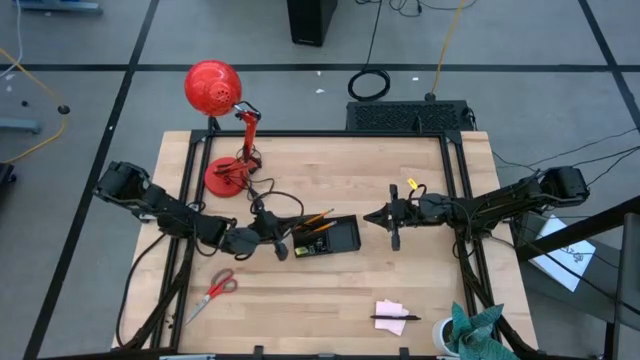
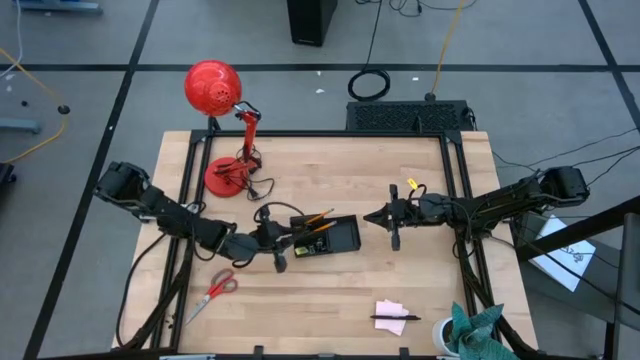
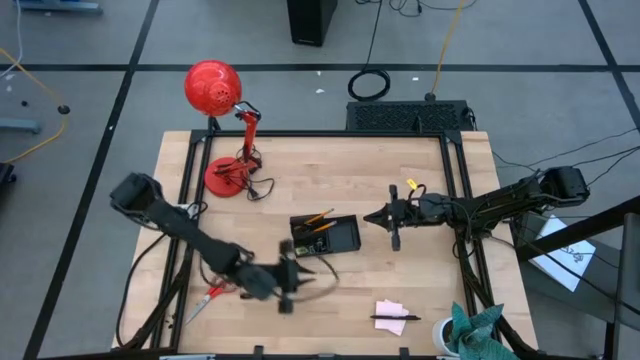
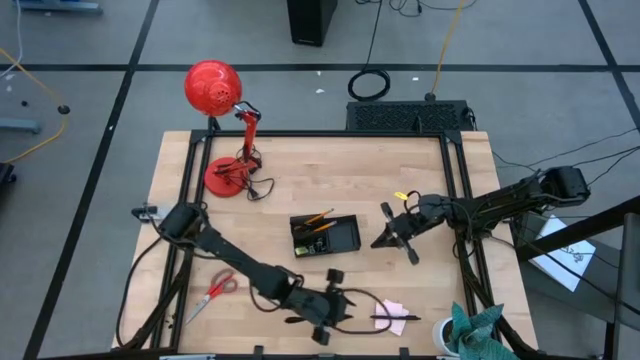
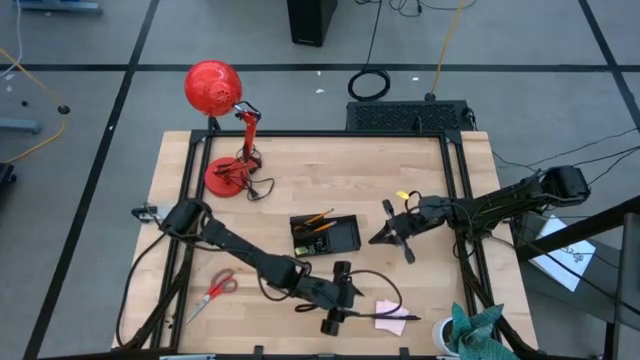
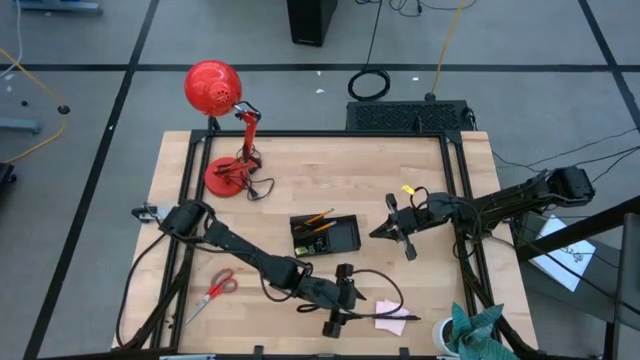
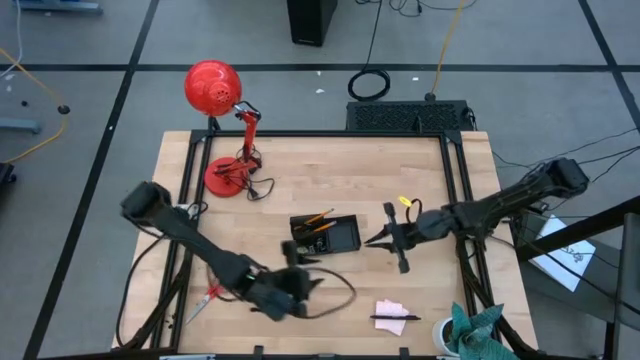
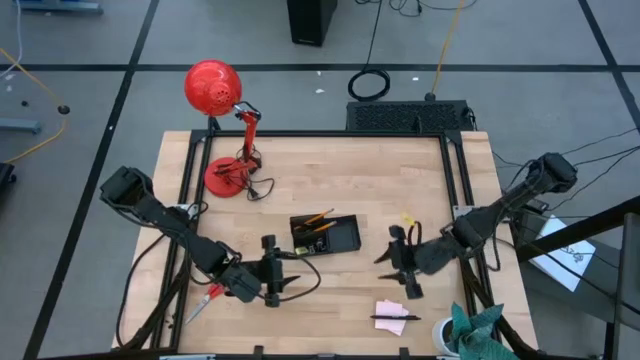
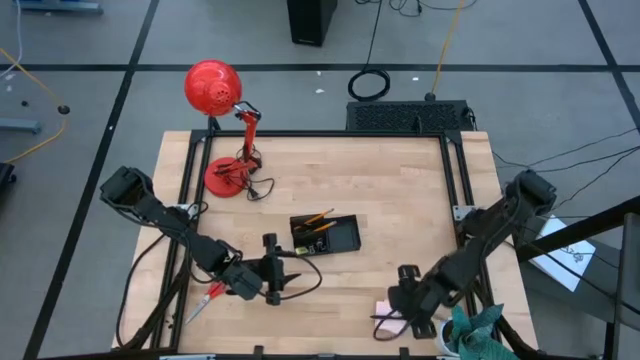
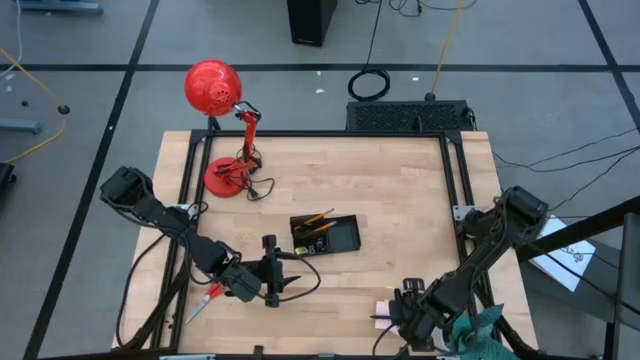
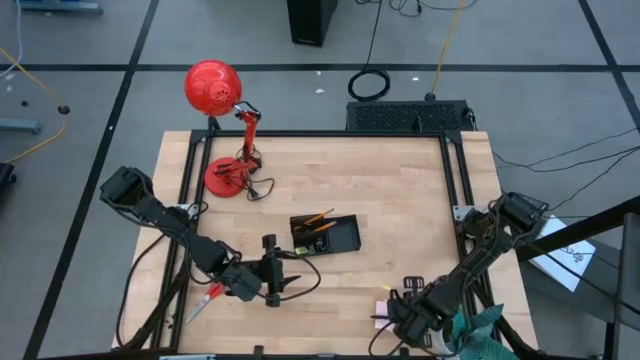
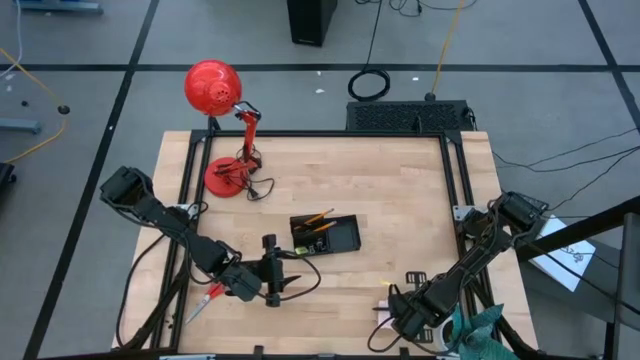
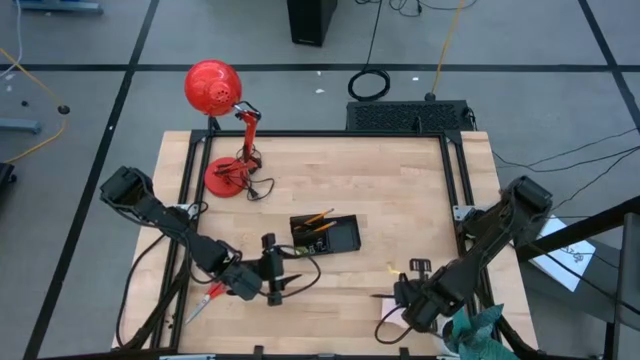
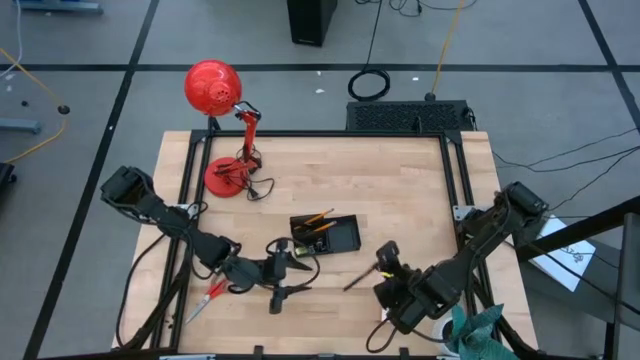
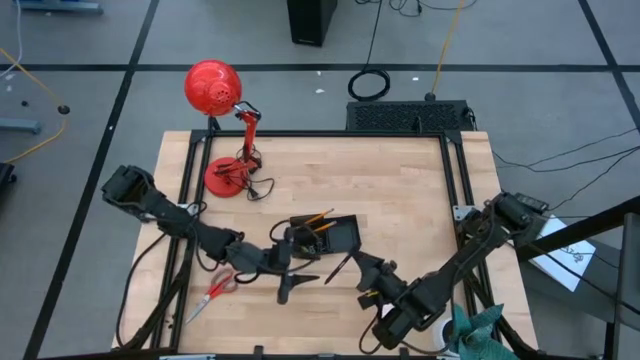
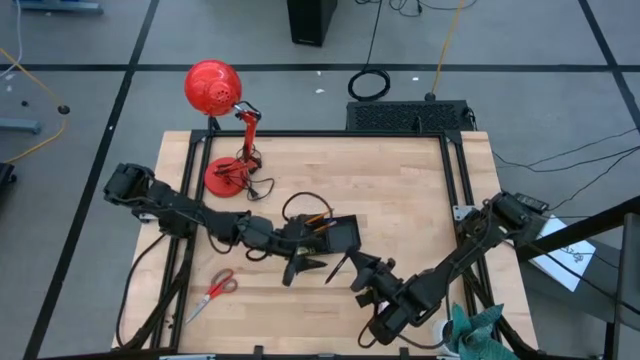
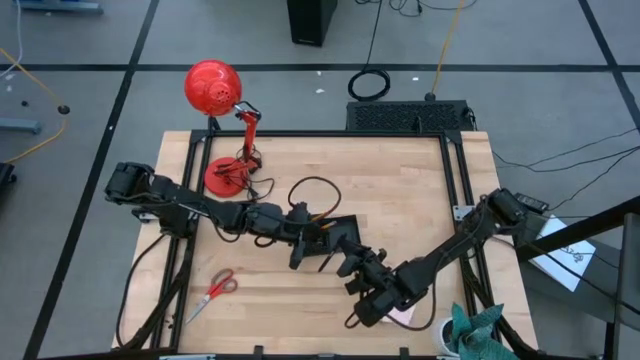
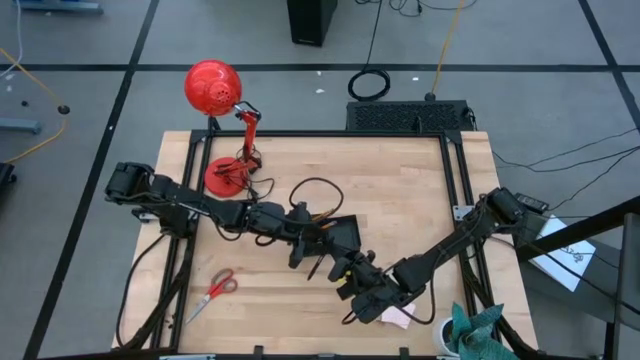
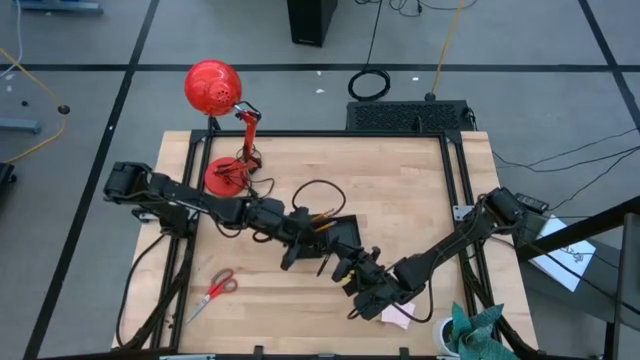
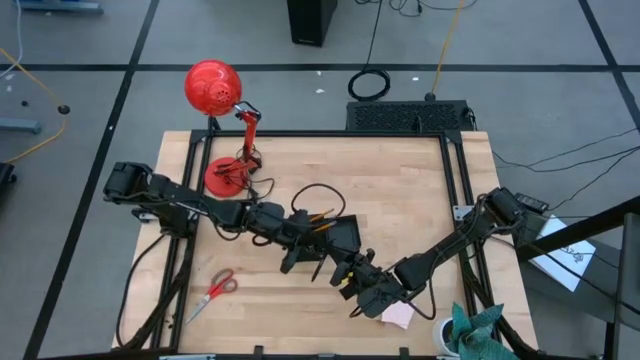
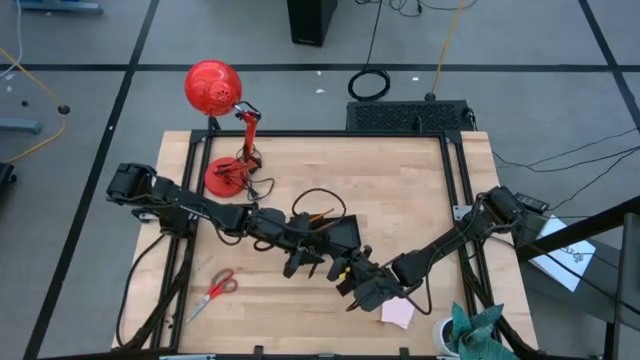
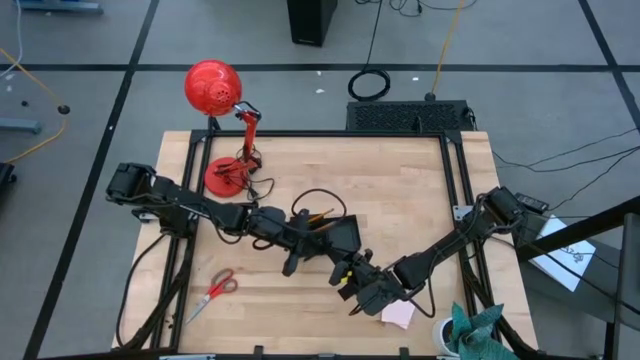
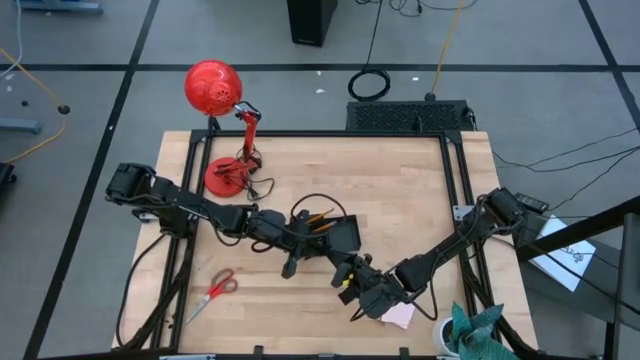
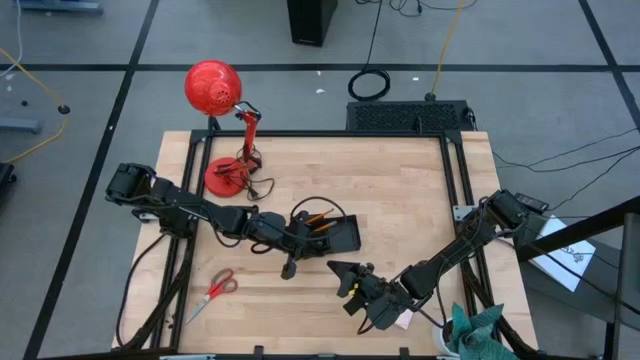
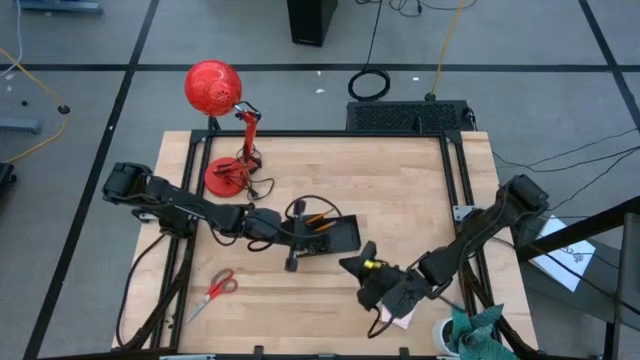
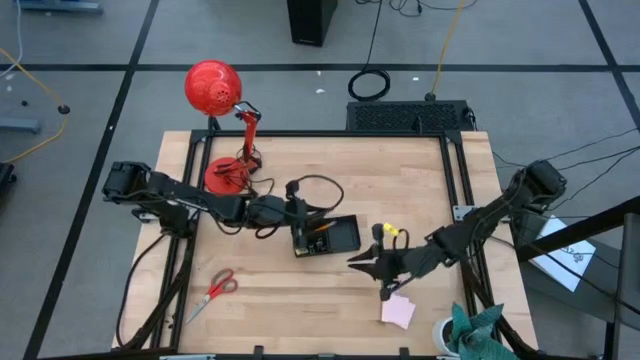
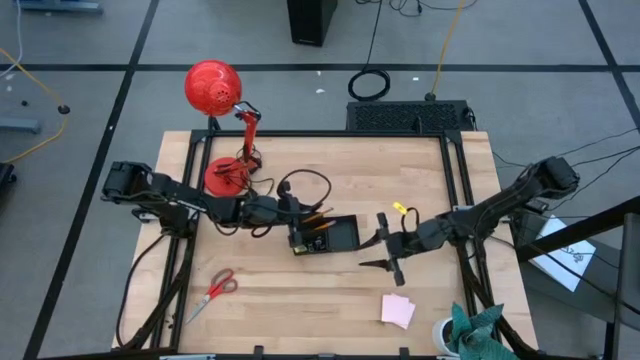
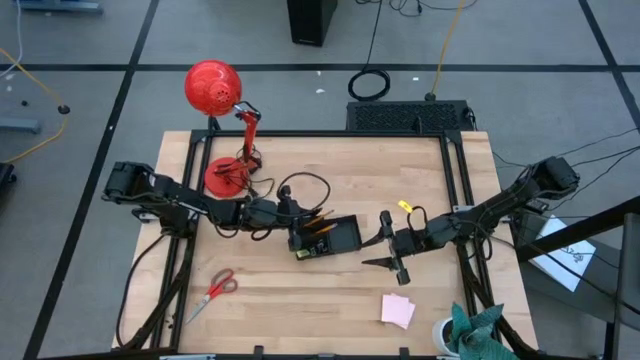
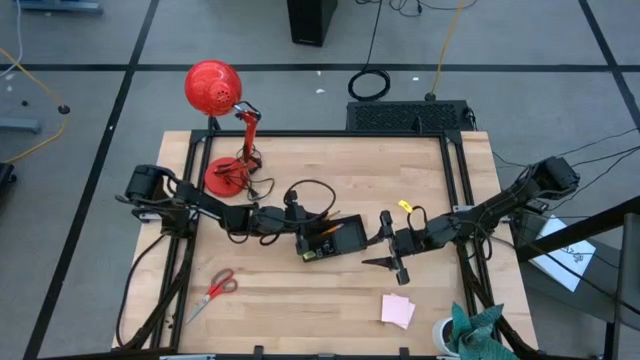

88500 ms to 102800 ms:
Task: Pick and place office supplies into organizer
Put the pen into the desk organizer

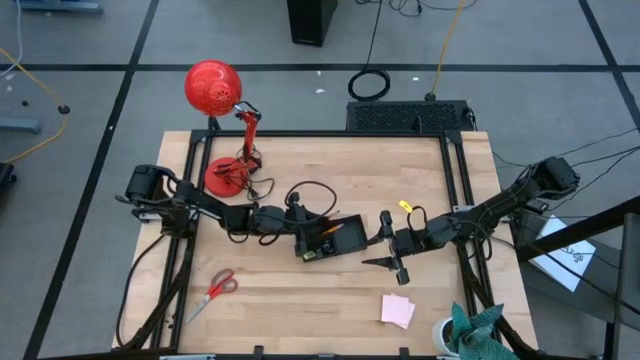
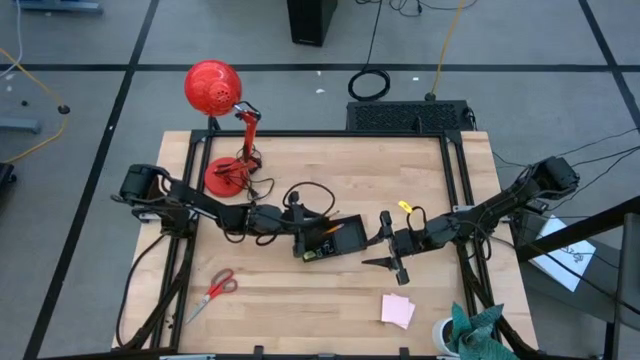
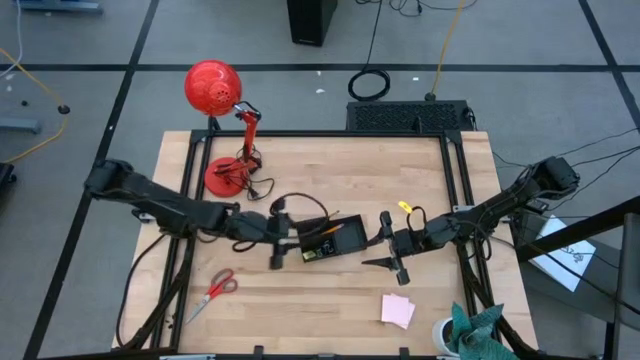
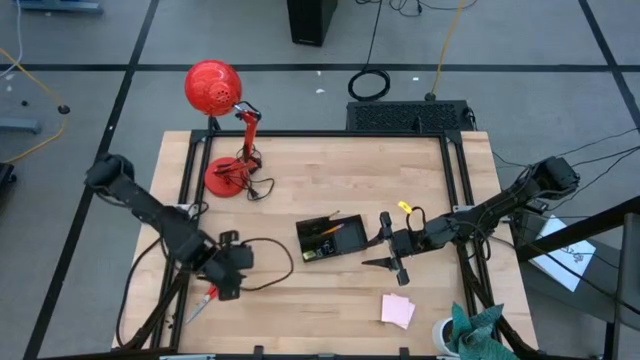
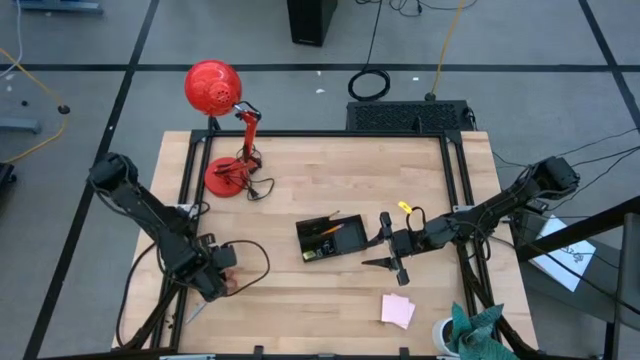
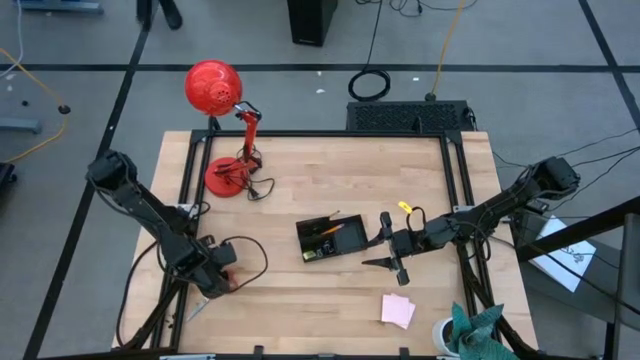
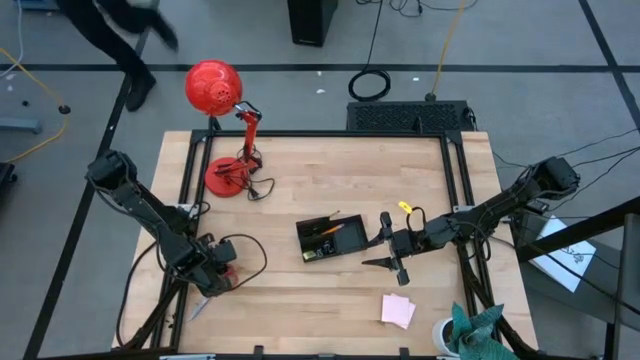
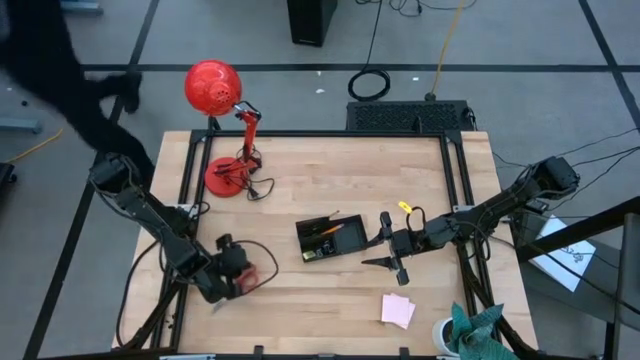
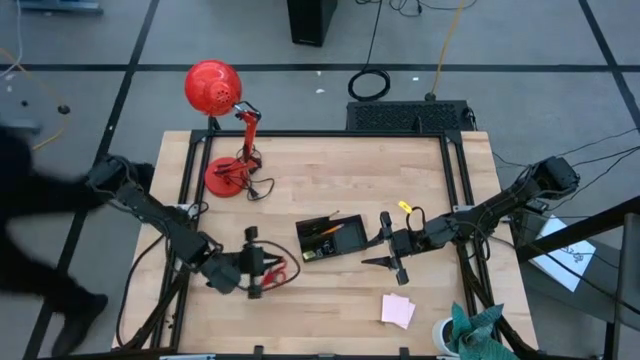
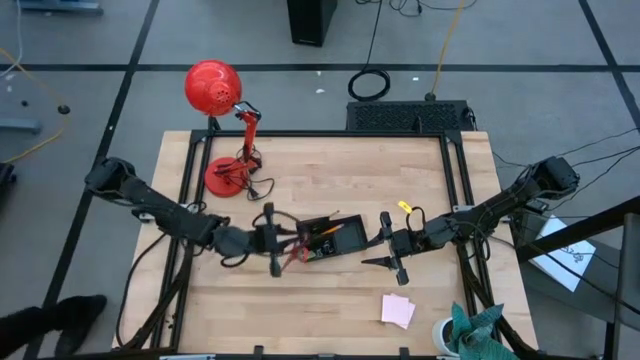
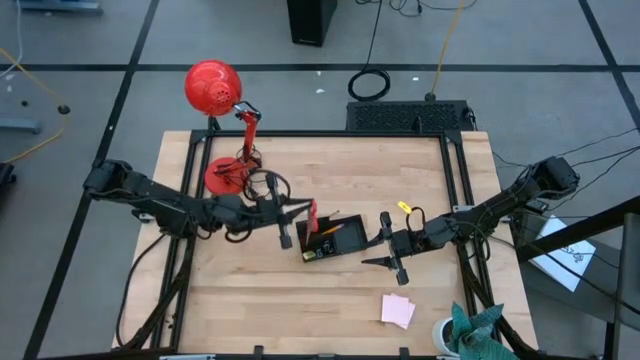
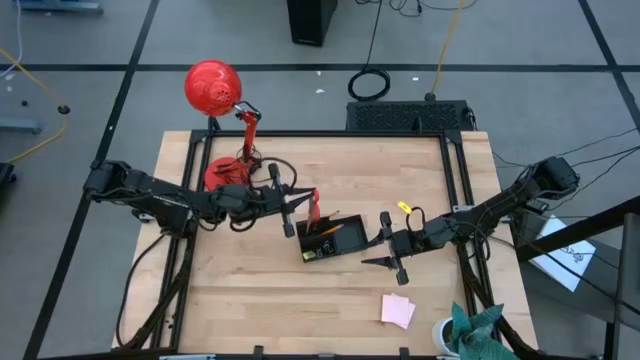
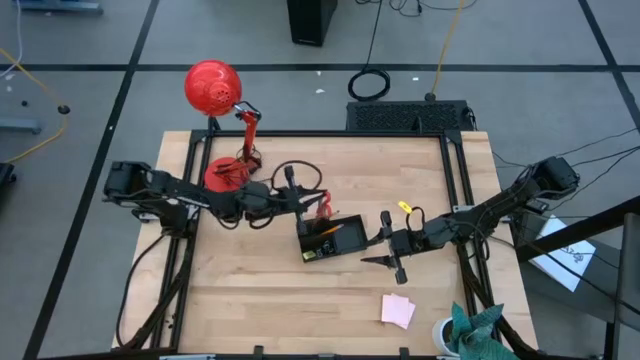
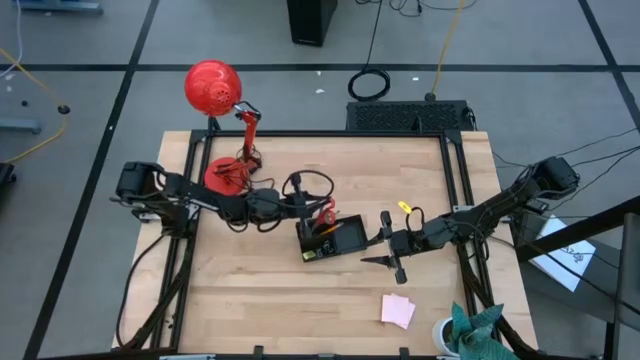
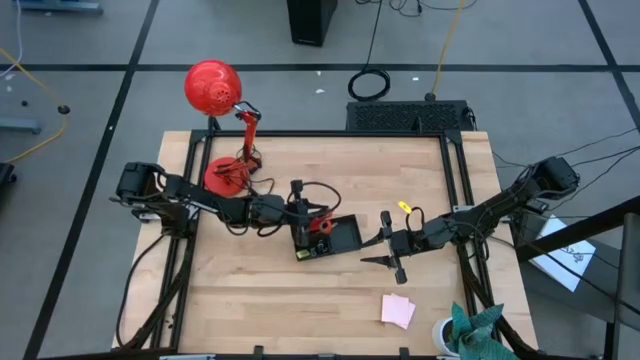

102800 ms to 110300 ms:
Put the scissors into the desk organizer

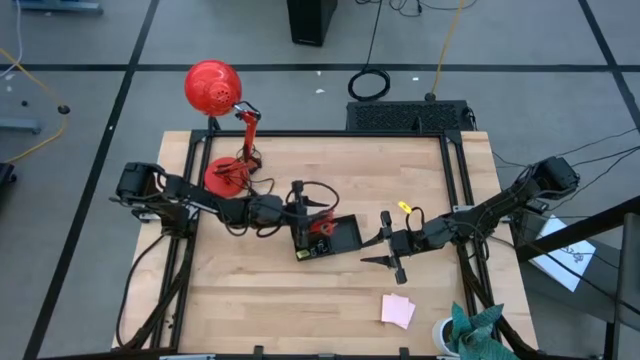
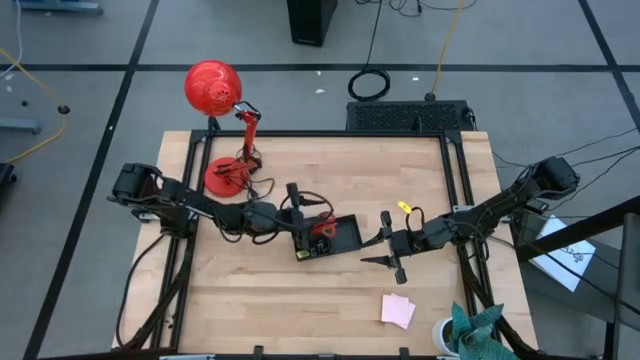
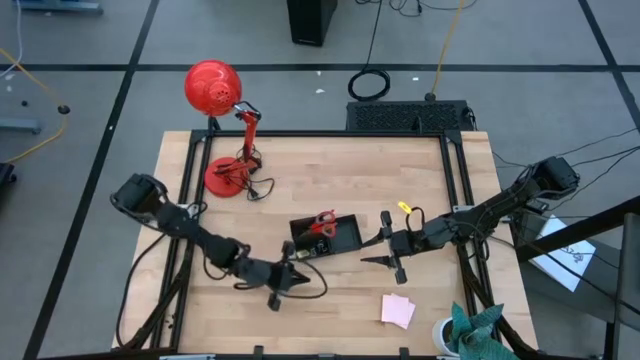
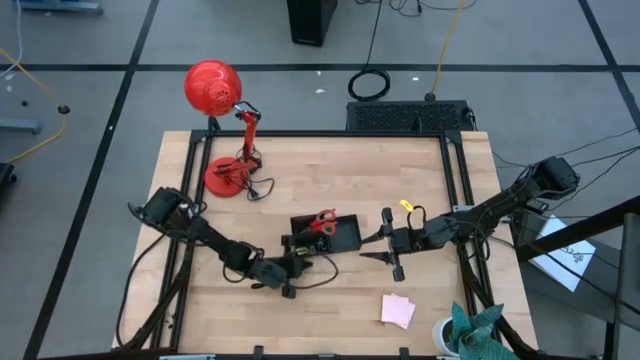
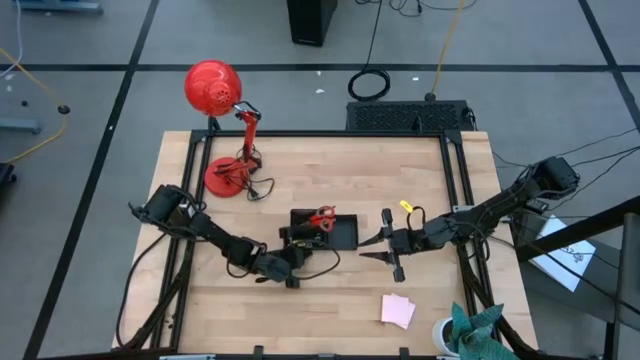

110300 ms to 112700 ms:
Adjust the desk organizer on the table
